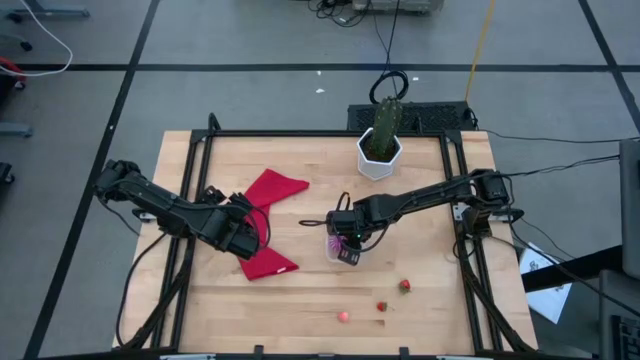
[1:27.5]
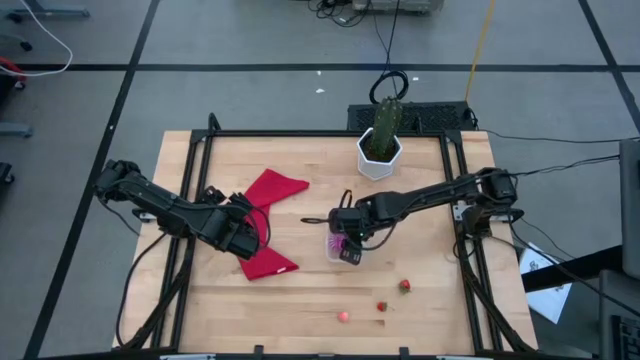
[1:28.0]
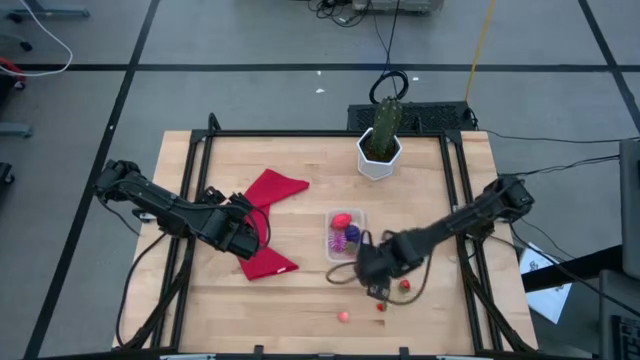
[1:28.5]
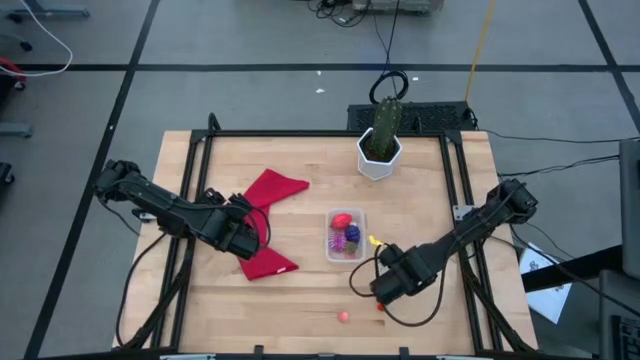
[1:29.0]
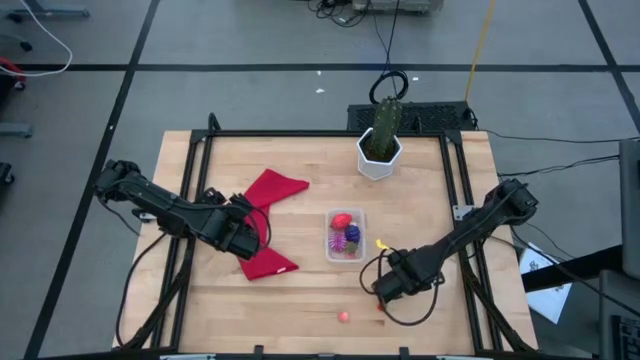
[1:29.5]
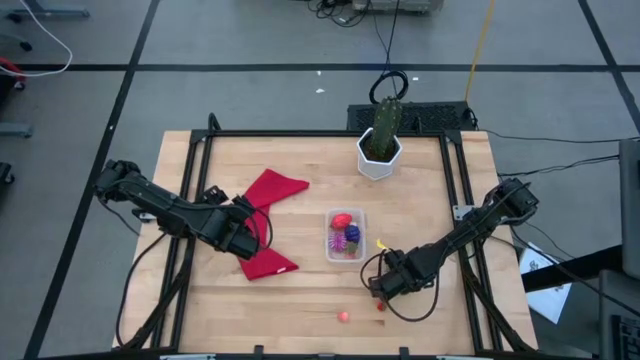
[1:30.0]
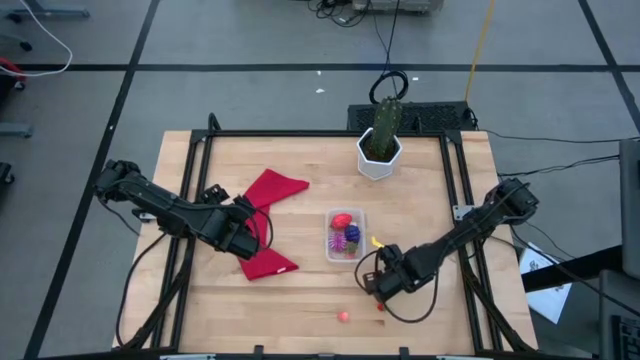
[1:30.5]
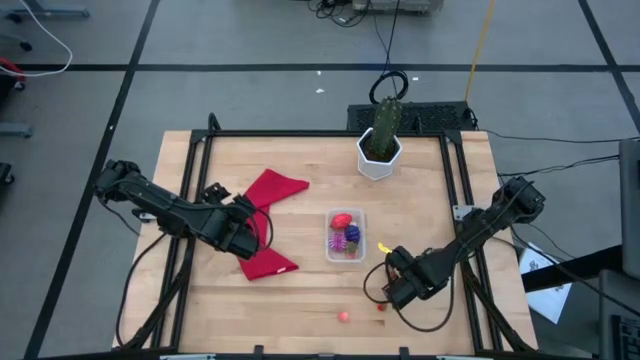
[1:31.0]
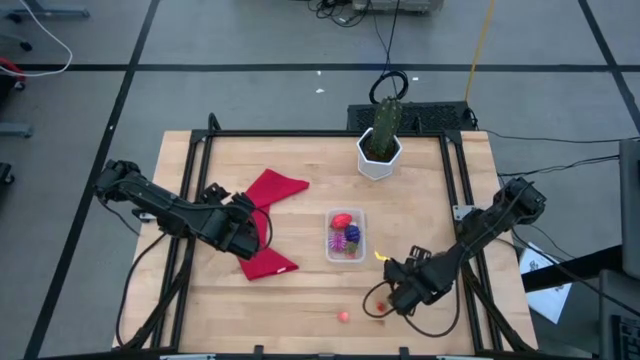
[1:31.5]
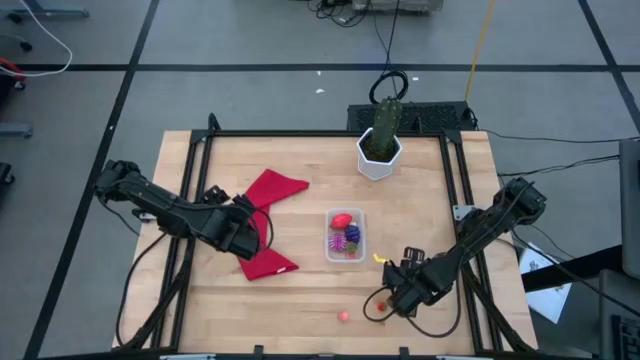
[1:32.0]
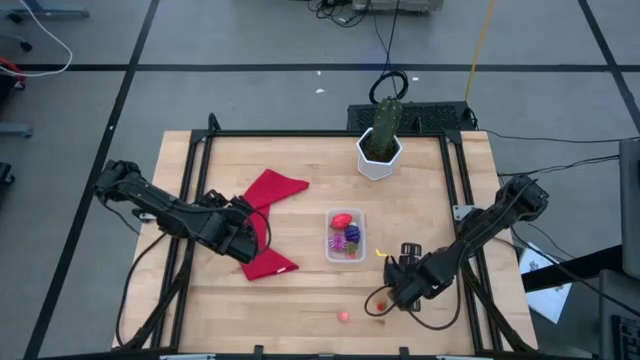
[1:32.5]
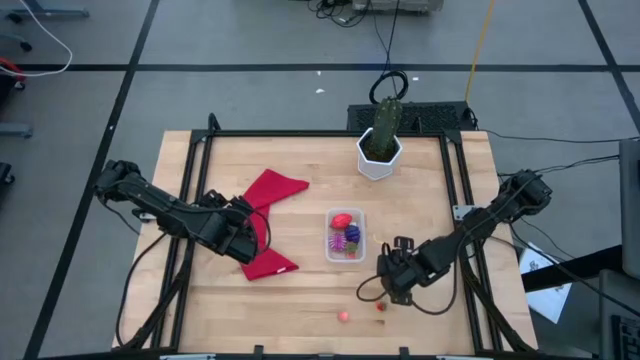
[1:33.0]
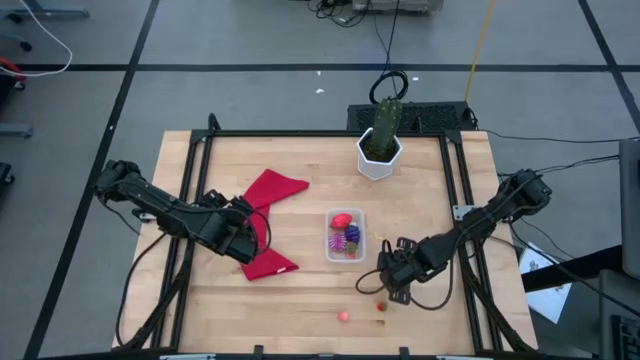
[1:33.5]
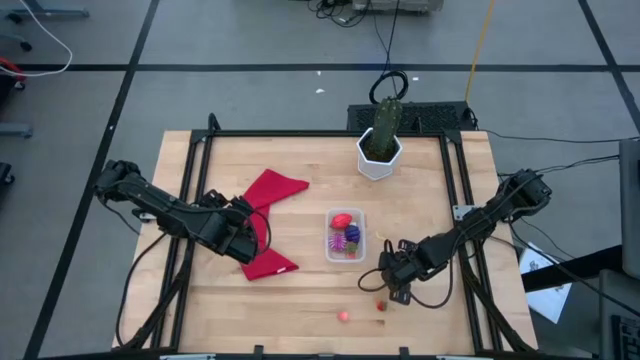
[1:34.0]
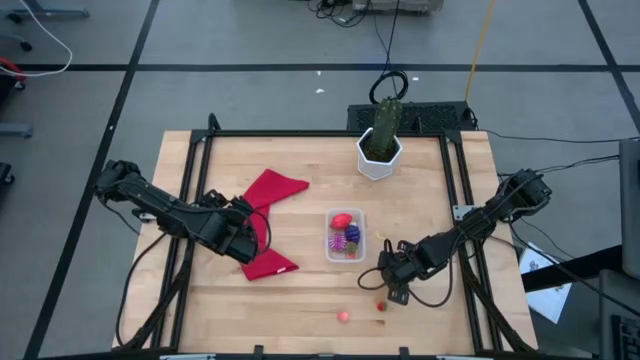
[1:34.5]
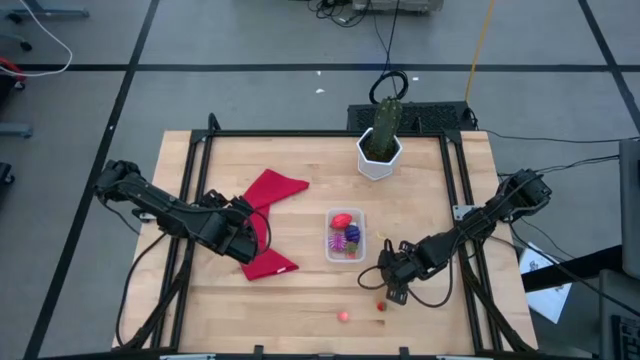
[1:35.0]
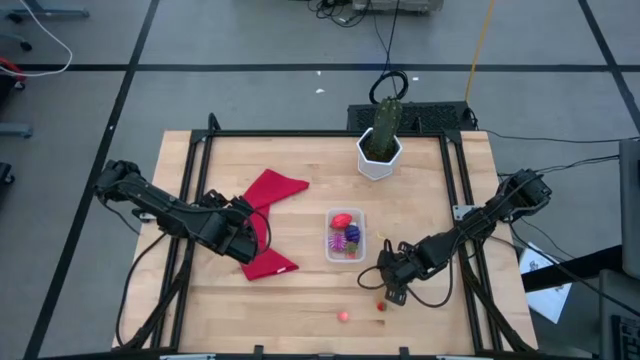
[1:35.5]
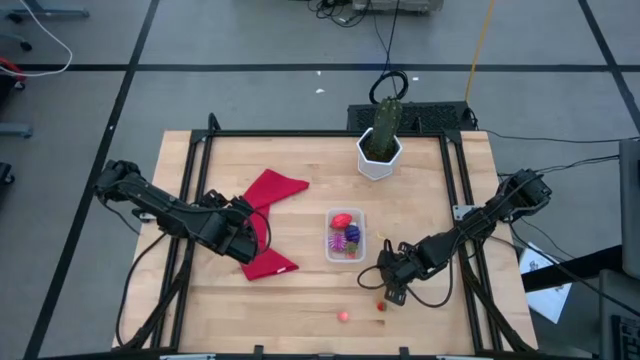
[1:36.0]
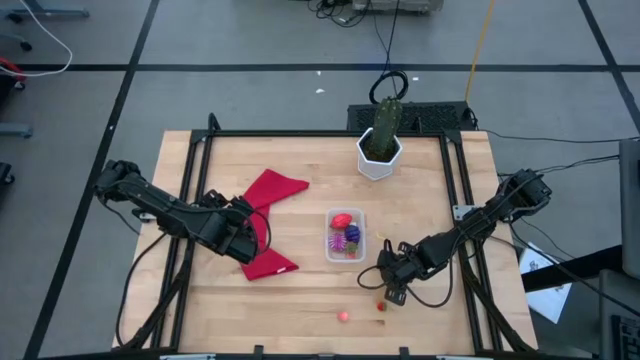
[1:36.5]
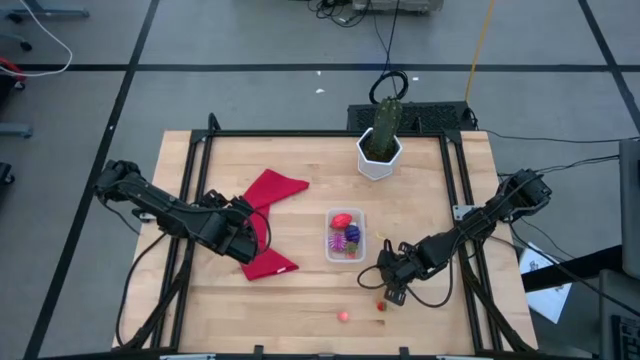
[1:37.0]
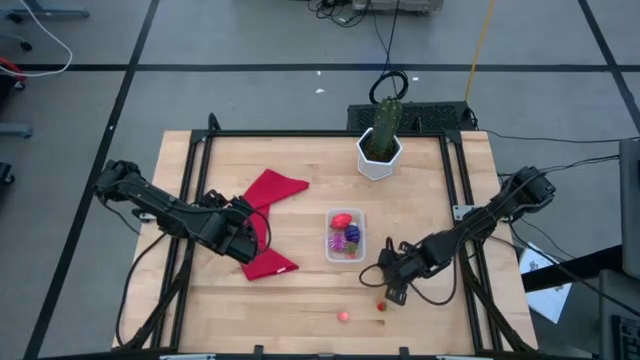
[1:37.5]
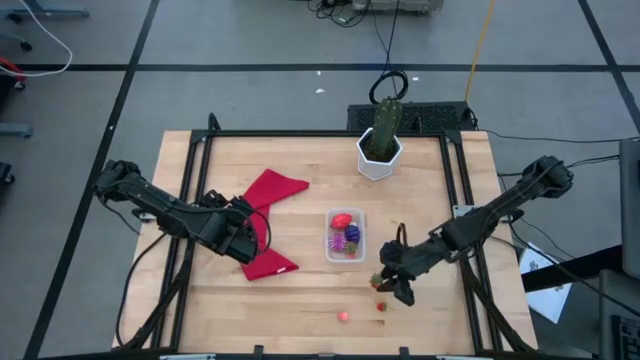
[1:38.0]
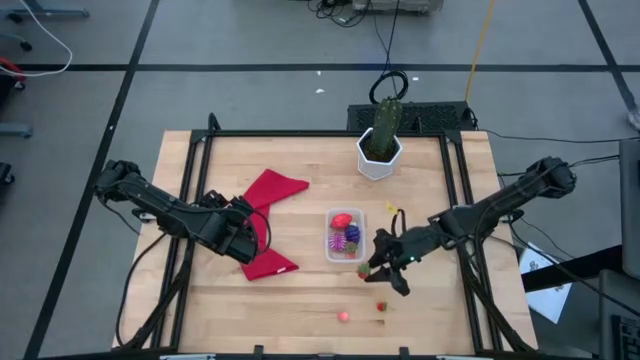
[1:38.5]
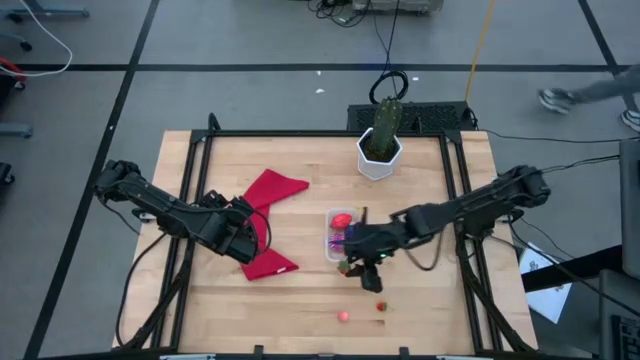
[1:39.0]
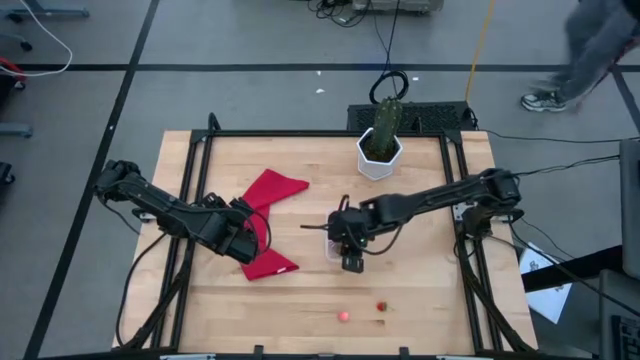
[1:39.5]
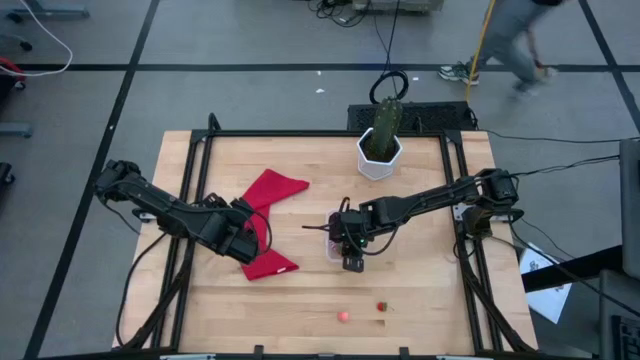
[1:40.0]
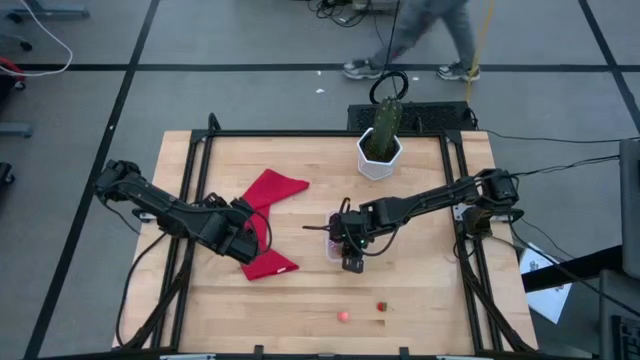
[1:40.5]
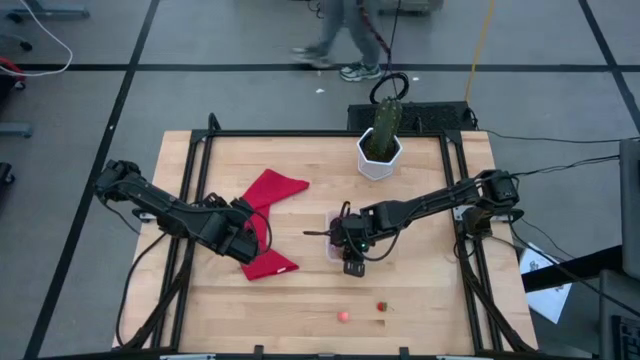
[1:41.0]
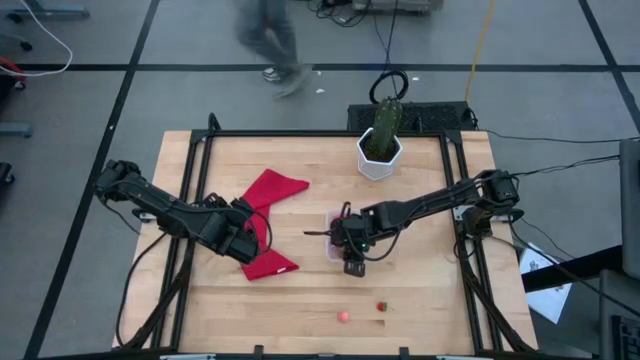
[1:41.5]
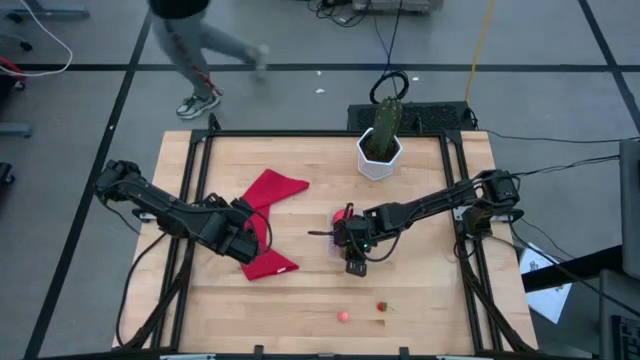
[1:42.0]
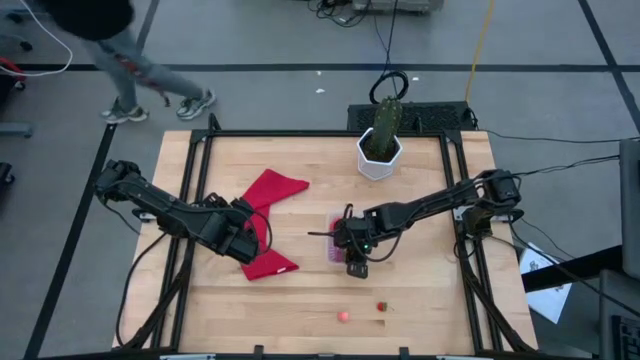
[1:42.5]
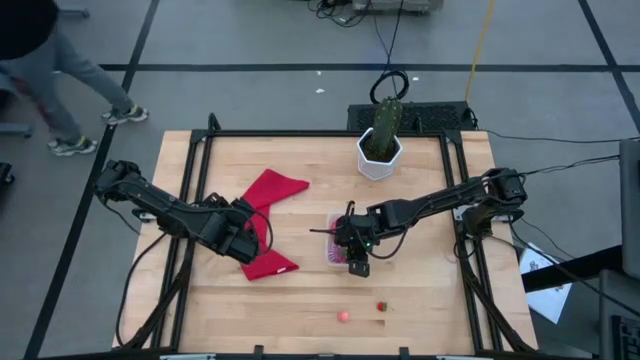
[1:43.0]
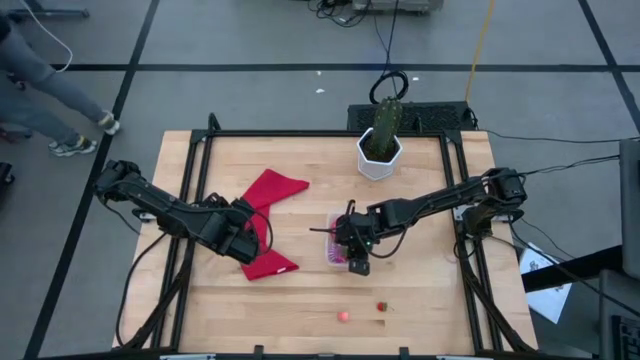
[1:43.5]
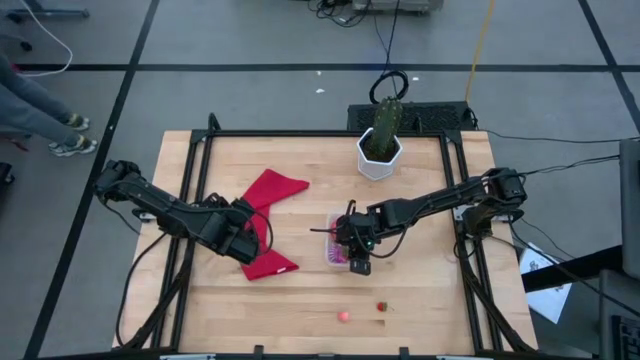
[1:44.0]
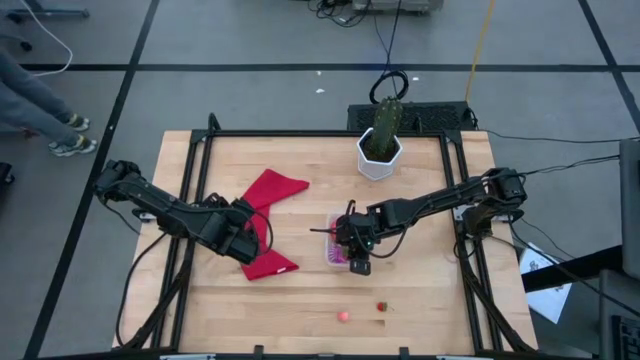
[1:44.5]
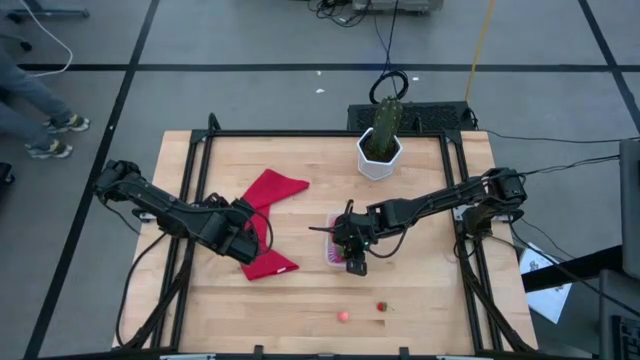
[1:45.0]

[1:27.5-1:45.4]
Task: Pick and placing Produce into tupperware
Put the top red strawberry into the transparent bin
